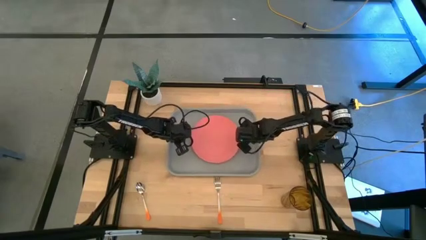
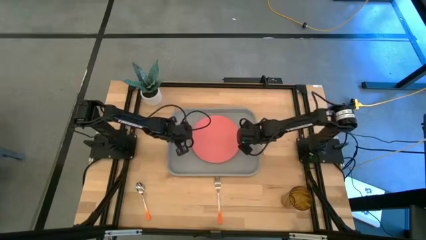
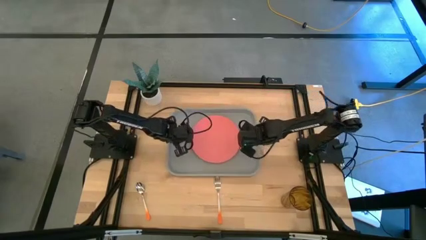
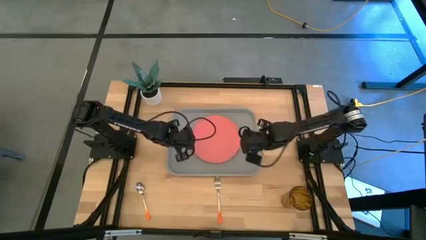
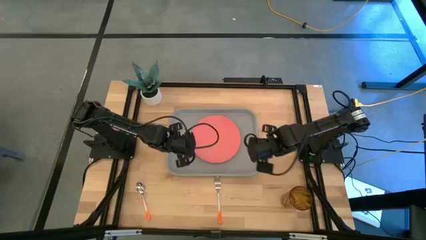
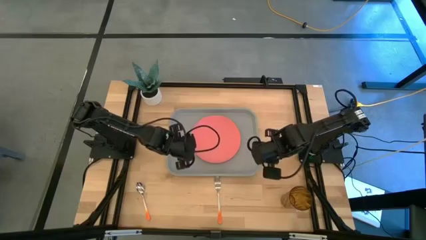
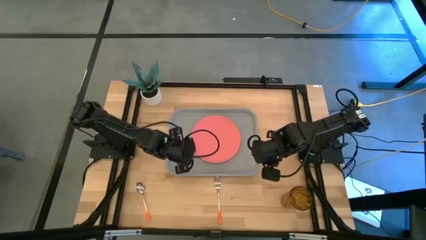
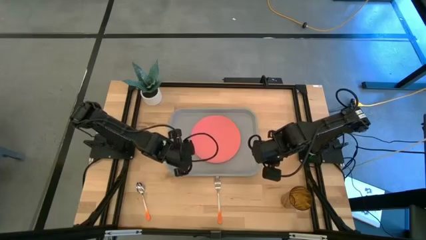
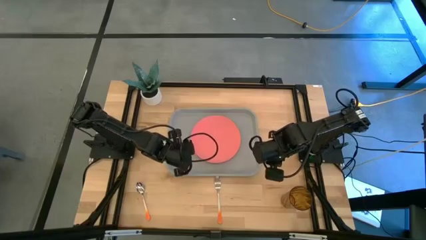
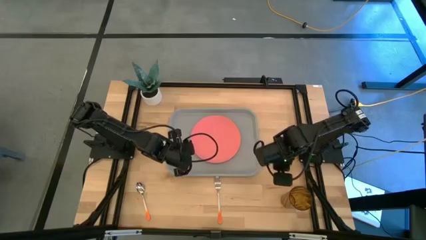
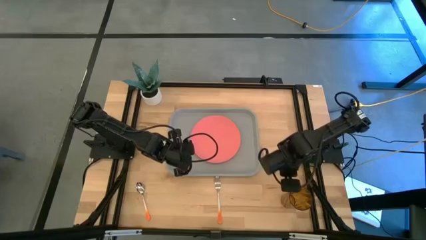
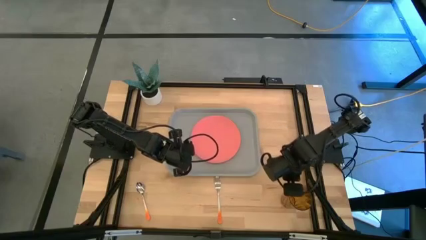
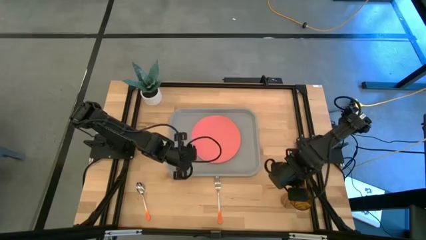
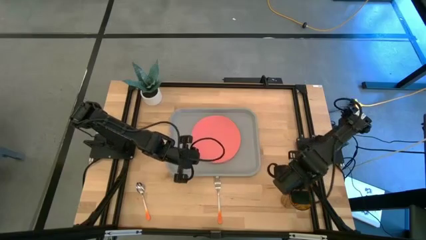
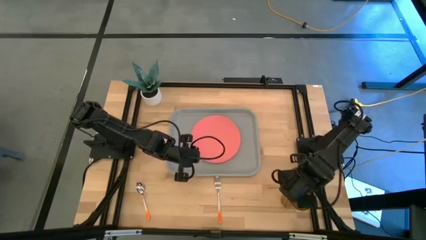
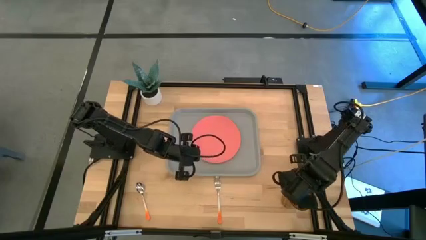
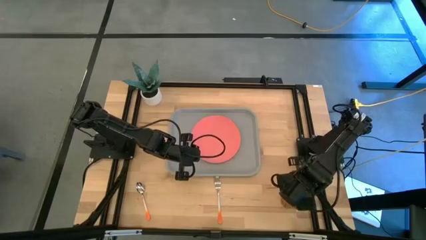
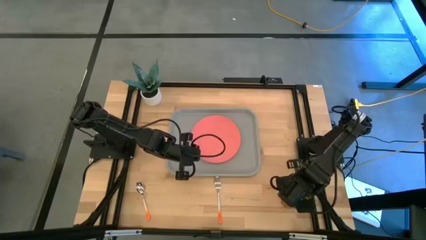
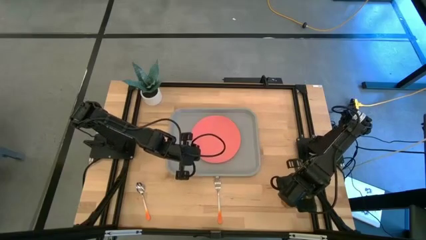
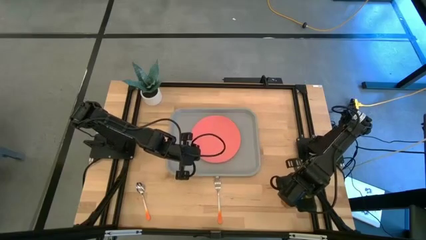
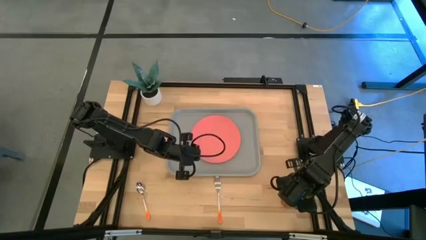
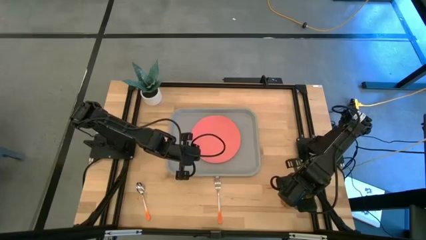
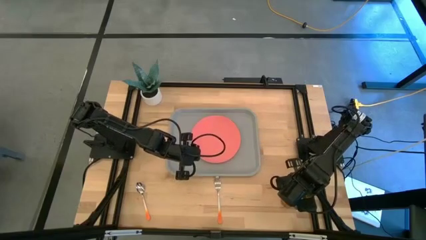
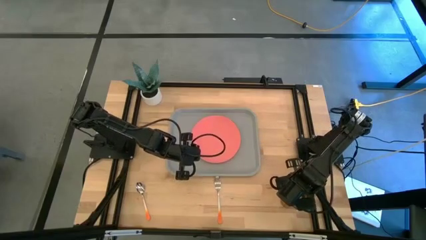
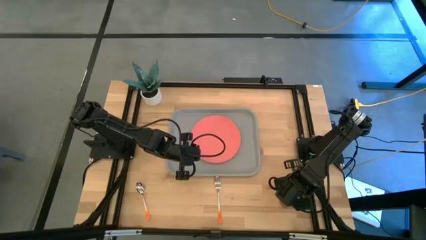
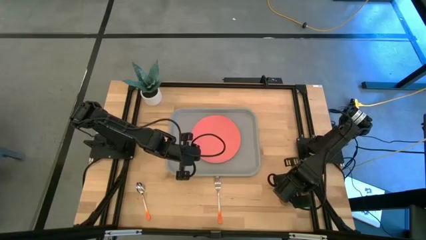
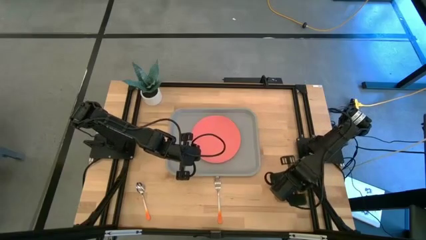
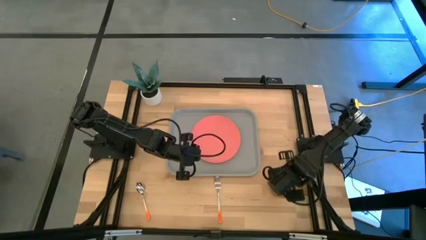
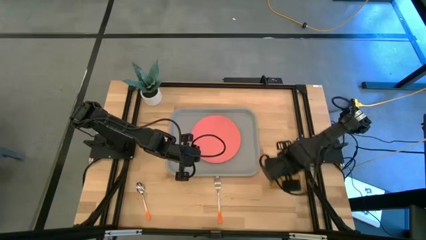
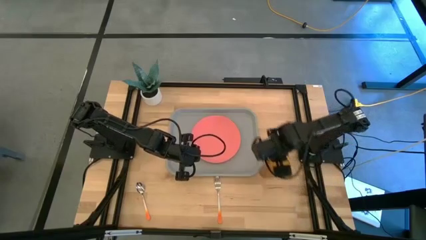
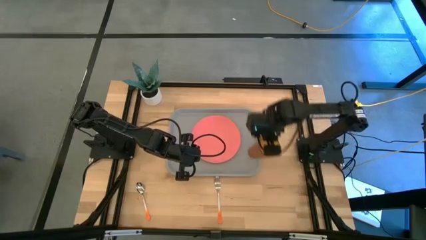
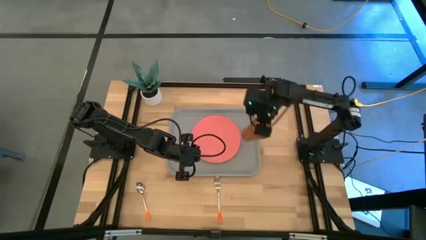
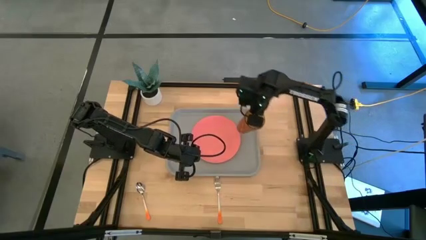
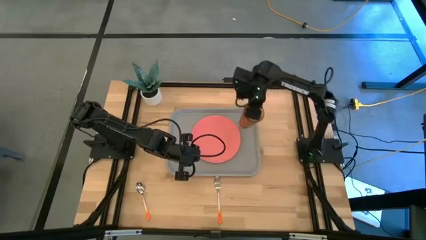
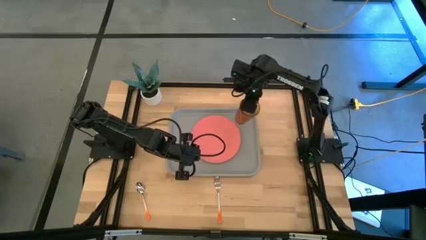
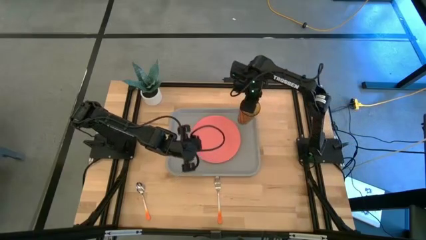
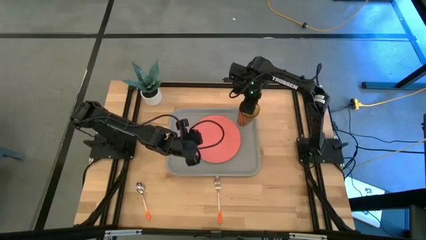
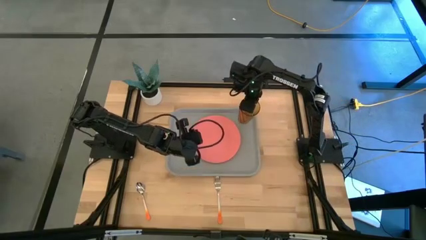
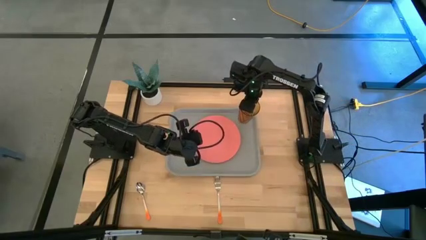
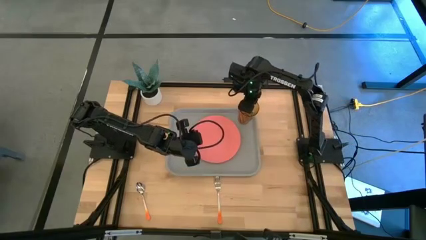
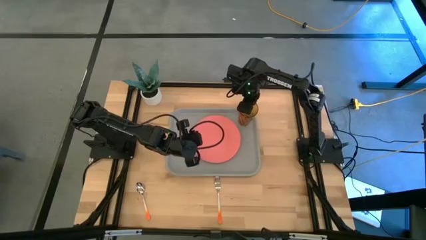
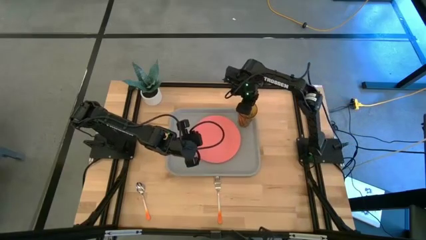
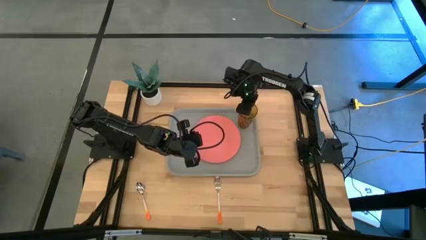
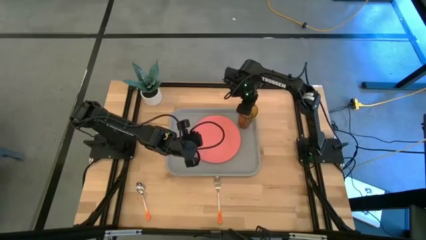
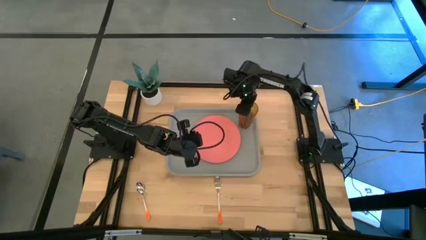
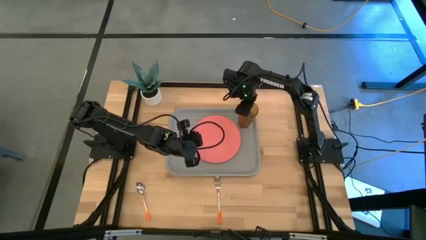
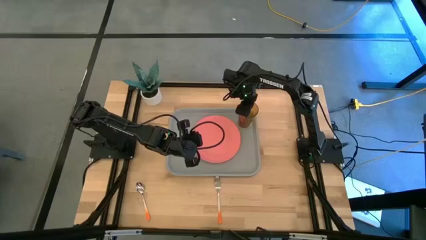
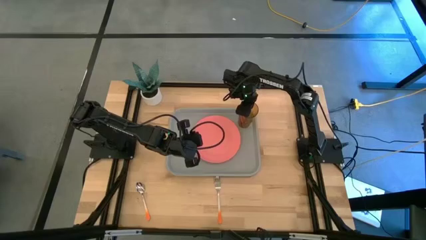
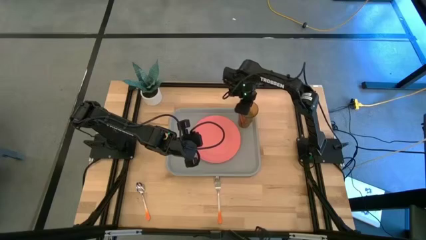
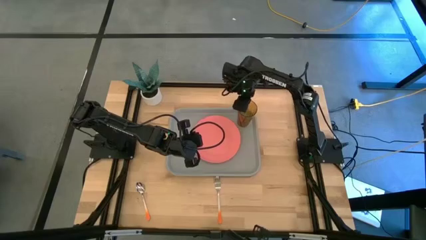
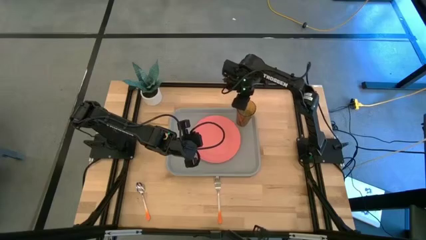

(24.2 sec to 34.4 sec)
Task: Pick and place plate/cup/fork/spoon on tray
Put the brown glass on the top right side of the gray tray

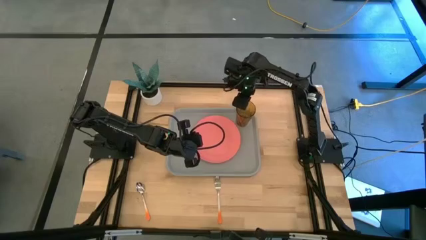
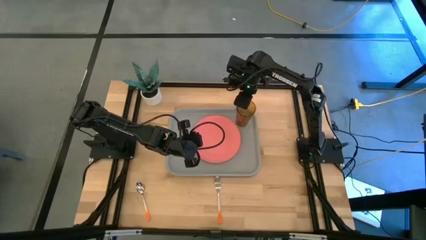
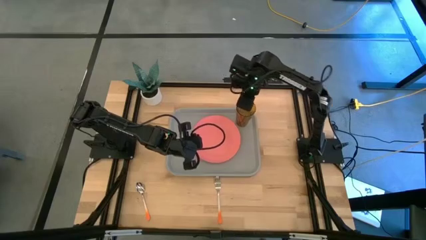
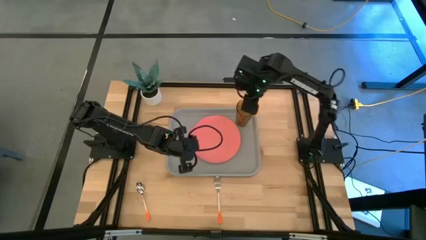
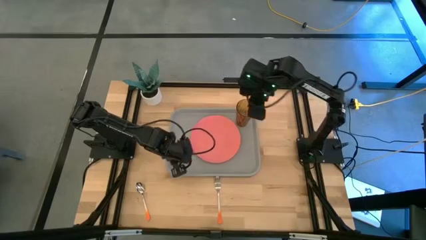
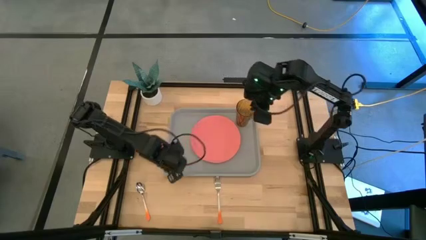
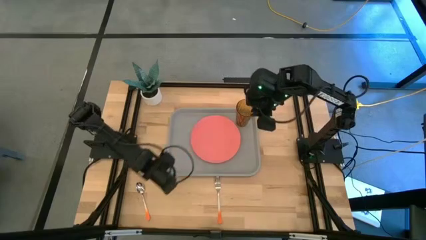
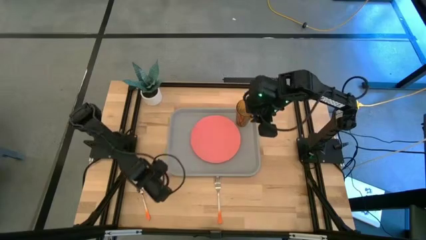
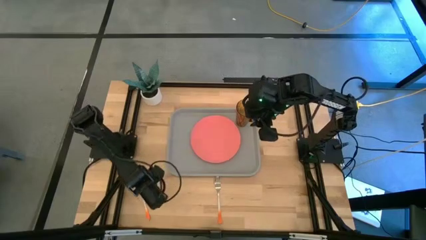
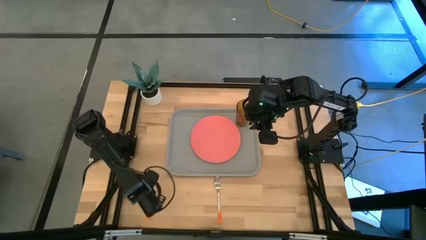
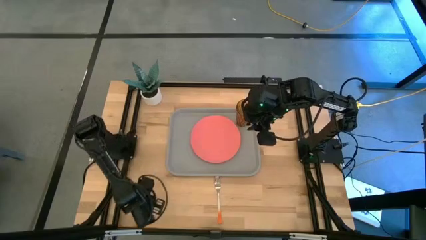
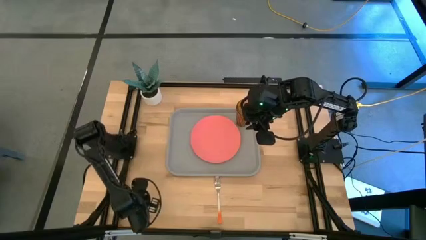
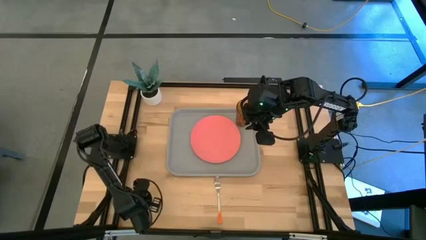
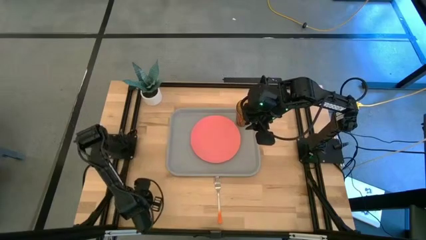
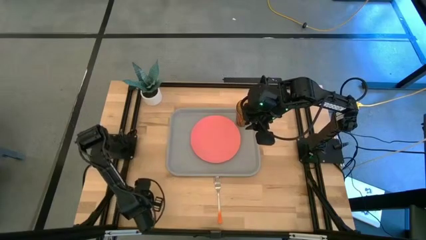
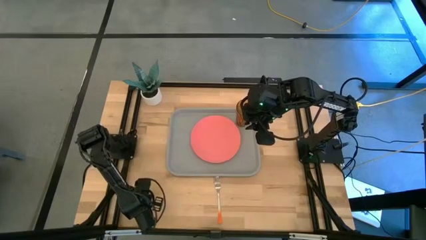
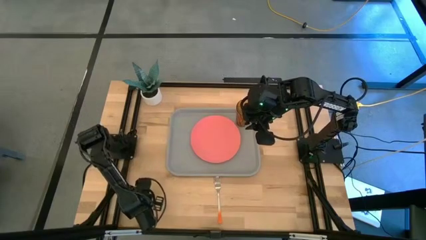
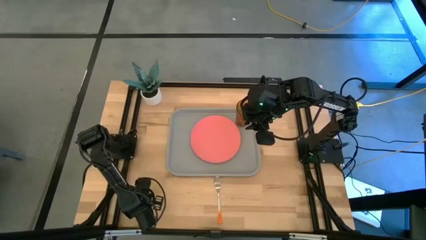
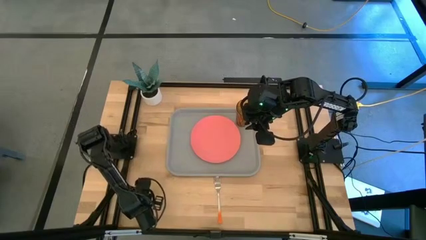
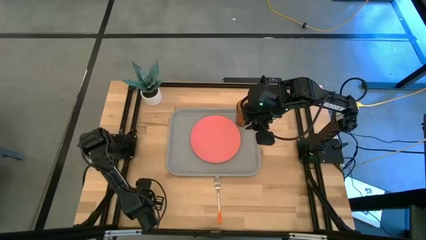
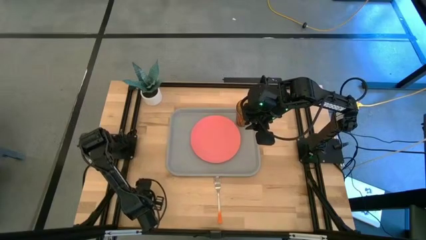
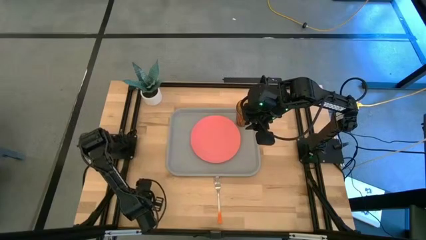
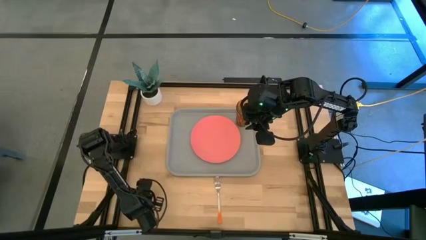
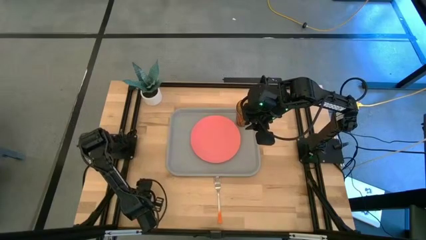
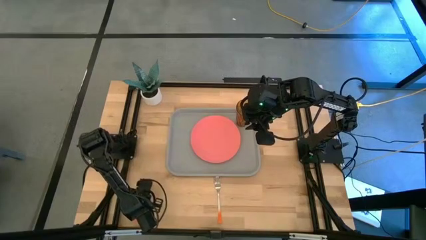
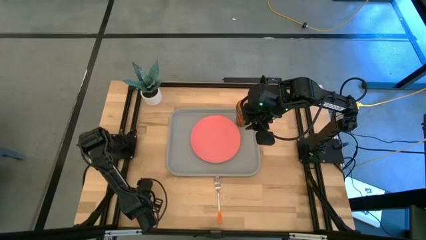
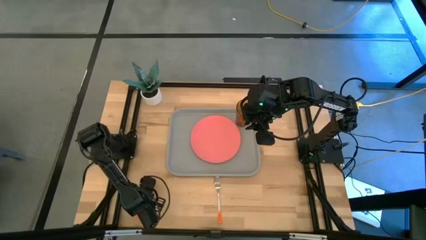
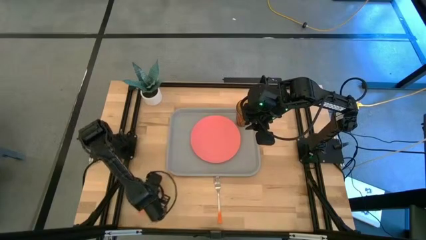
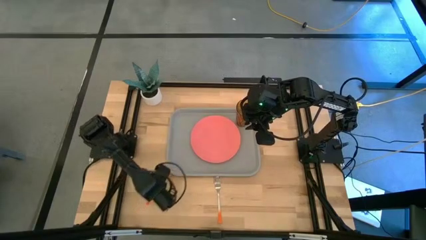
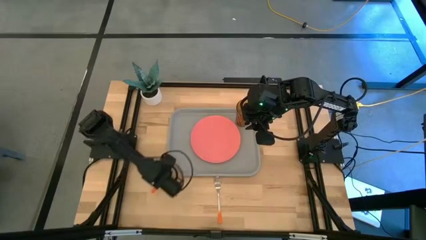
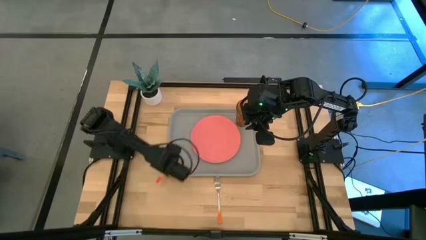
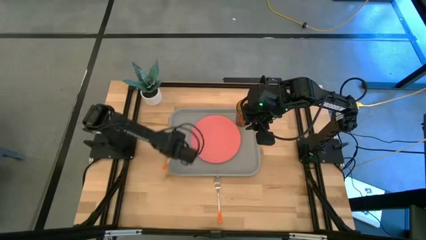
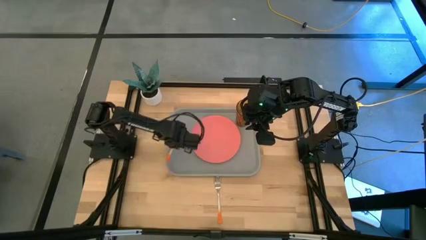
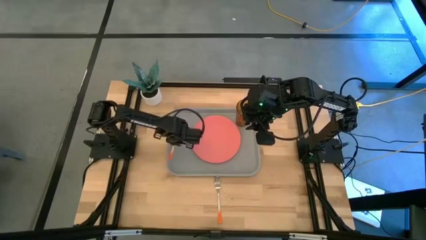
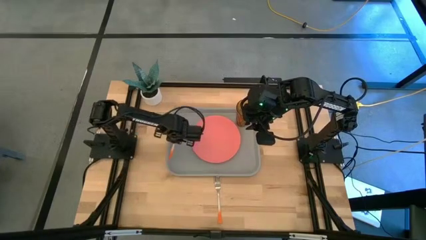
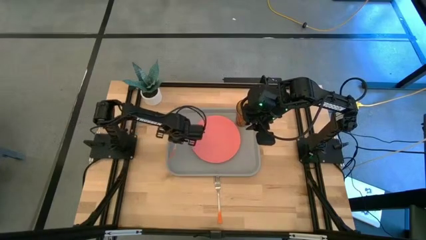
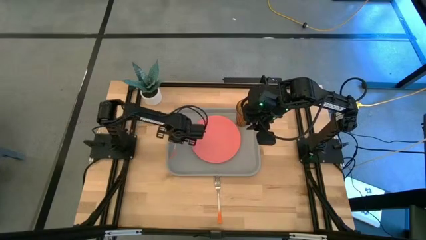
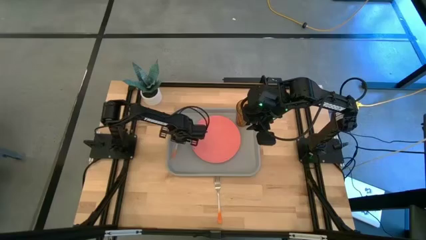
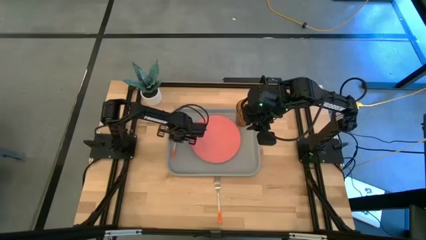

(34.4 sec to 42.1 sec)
Put the spoon on the left side of the gray tray
